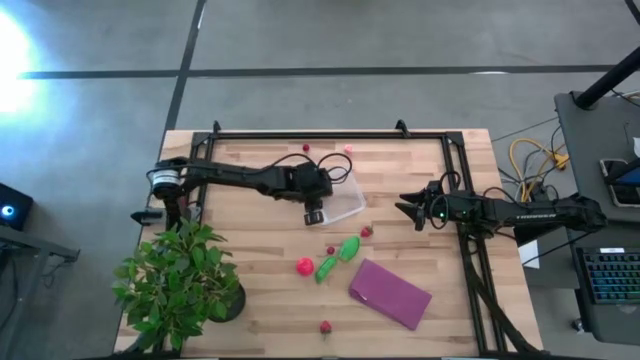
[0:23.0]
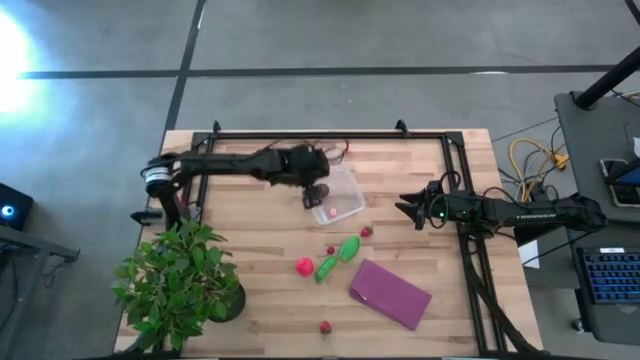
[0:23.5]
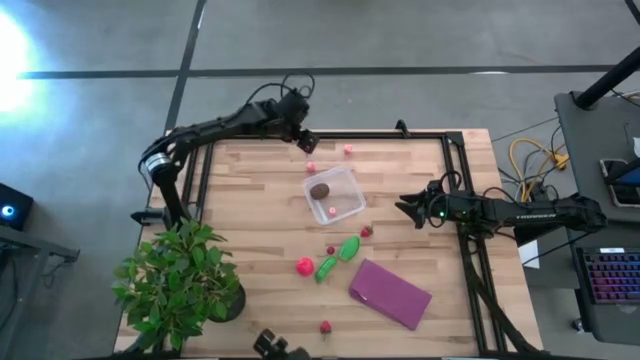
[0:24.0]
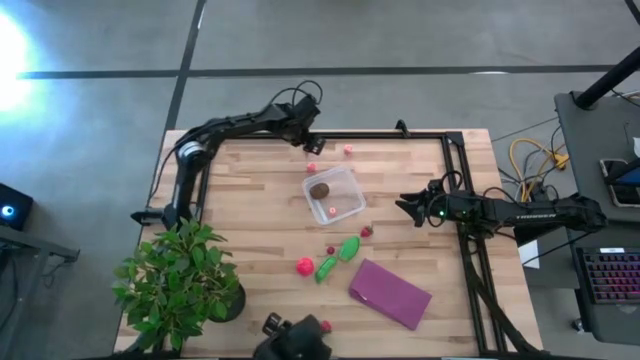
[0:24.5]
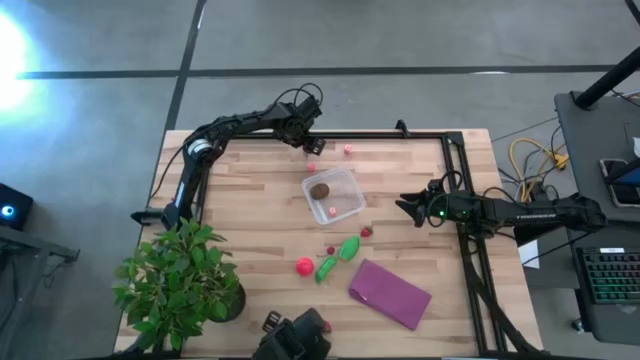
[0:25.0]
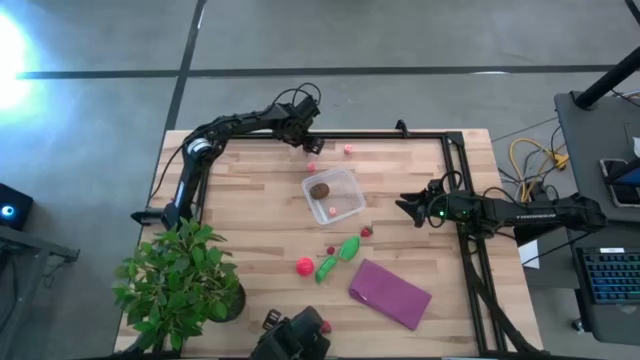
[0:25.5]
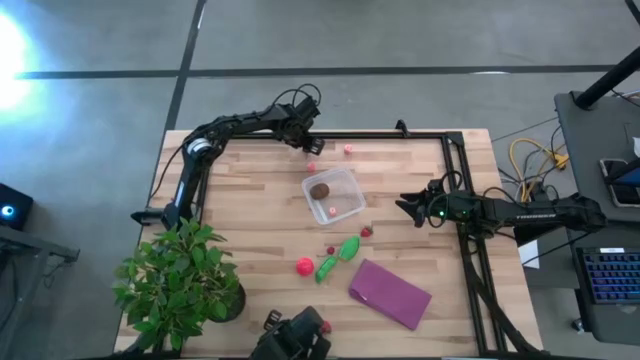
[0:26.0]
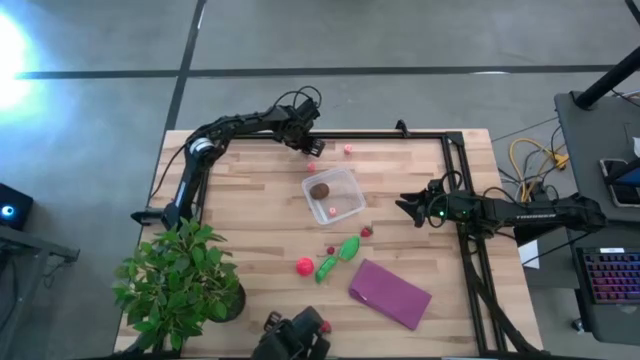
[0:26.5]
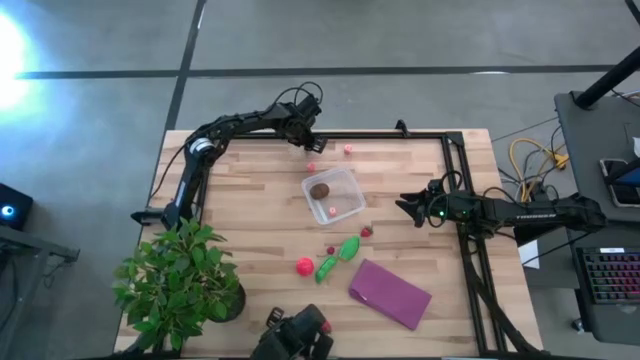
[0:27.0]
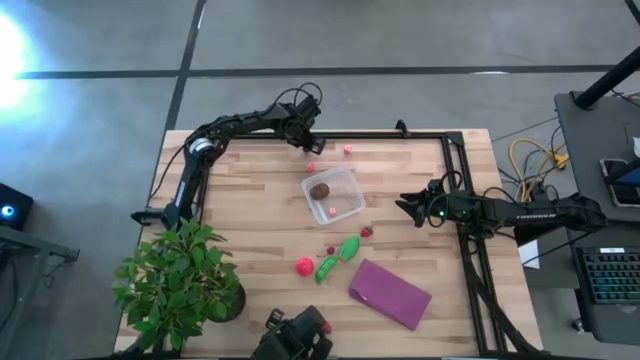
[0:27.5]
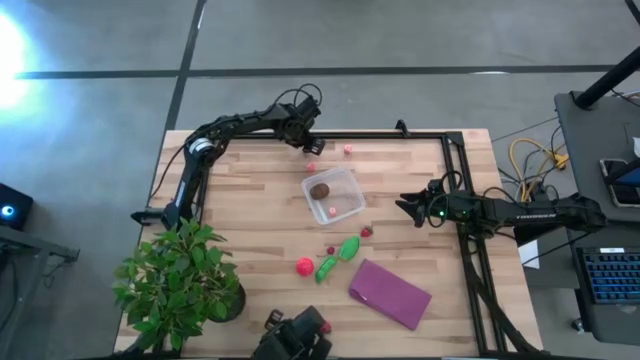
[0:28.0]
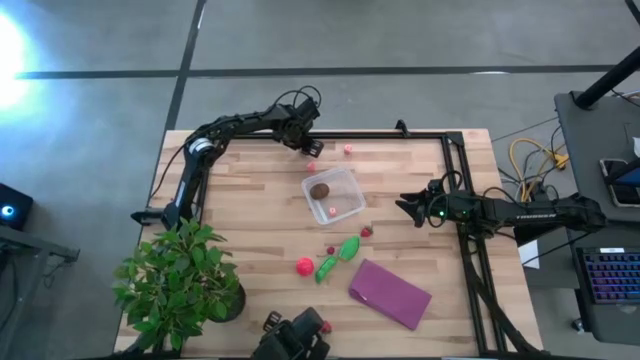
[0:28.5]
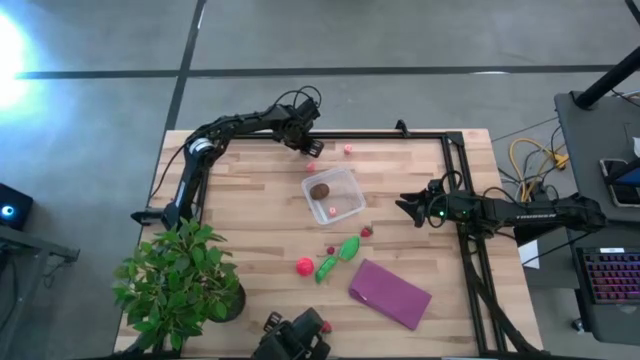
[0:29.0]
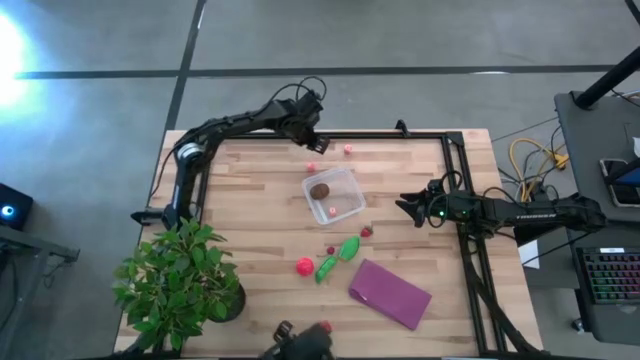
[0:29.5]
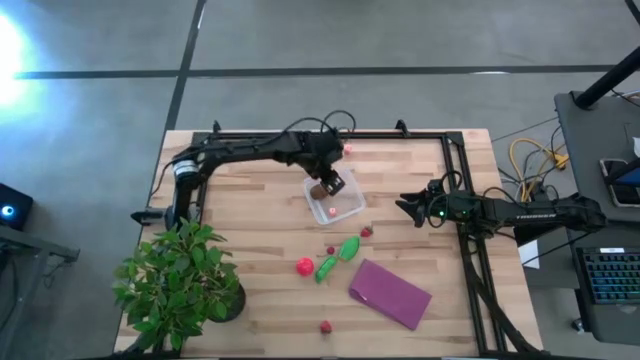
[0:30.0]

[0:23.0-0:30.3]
Task: Pick and placing Produce into tupperware
Put the top red cherry into the transparent bin

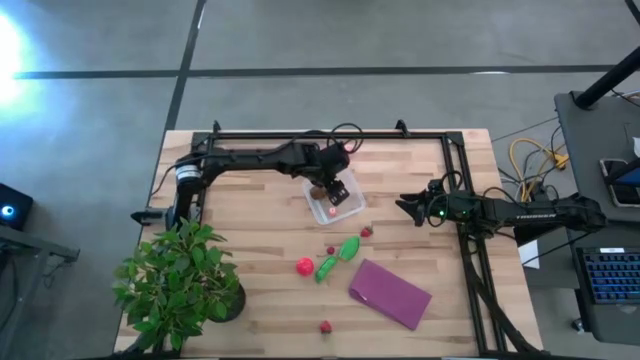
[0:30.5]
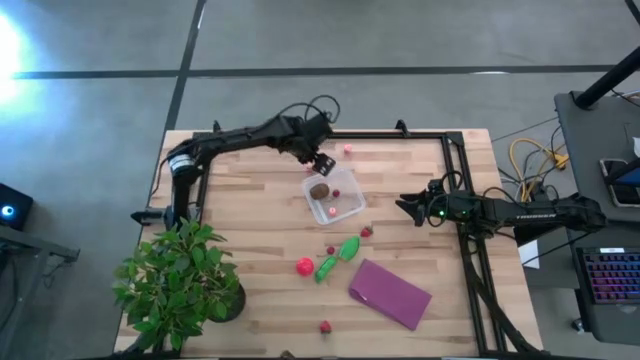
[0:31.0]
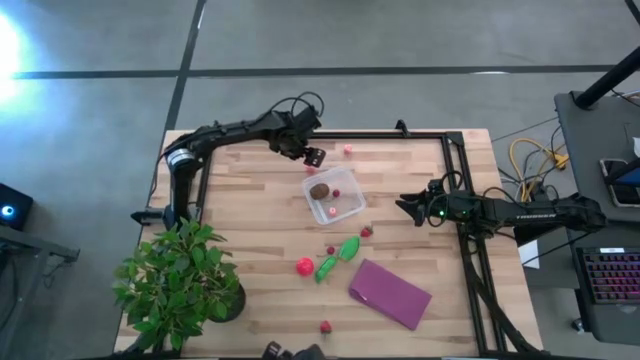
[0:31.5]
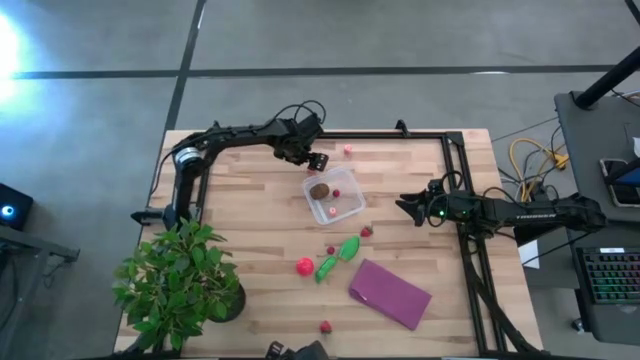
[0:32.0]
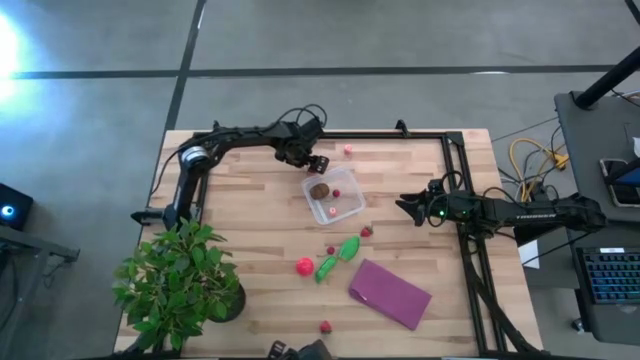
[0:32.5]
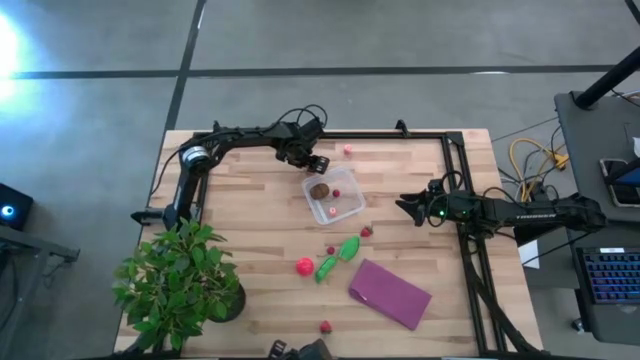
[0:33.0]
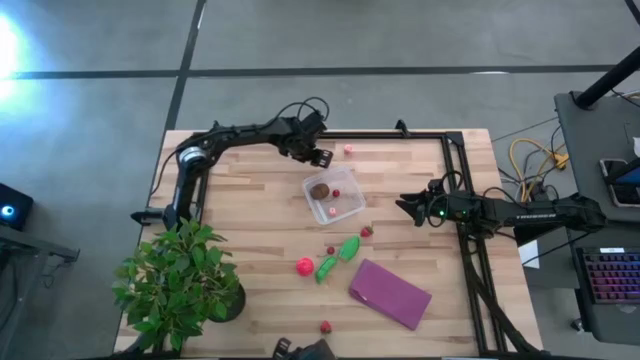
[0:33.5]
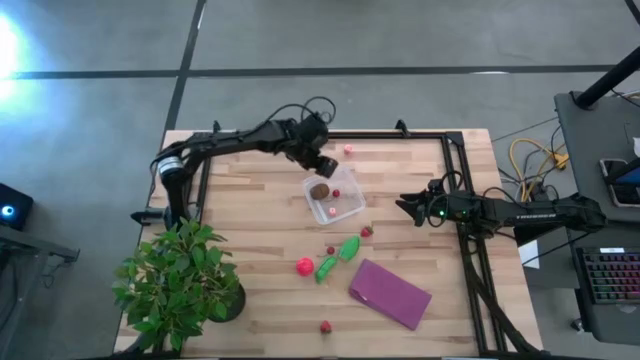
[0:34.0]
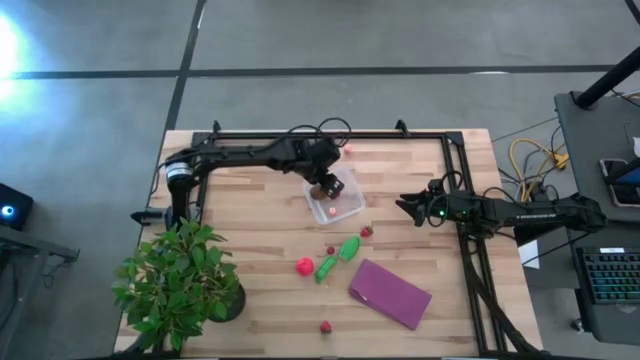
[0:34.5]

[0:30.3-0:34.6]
Put the left pink peach into the transparent bin

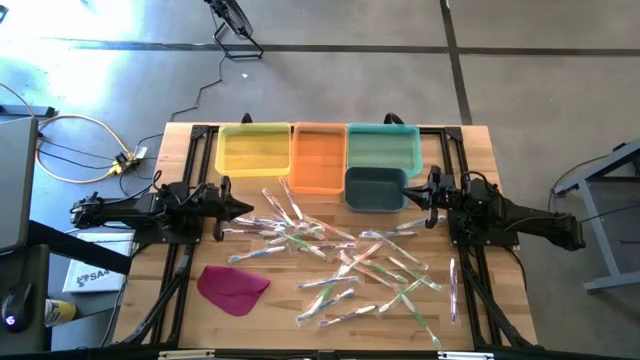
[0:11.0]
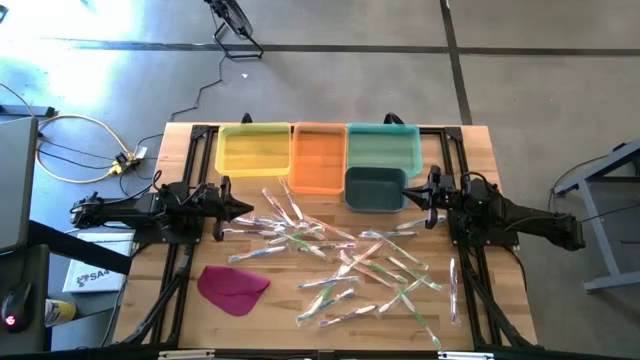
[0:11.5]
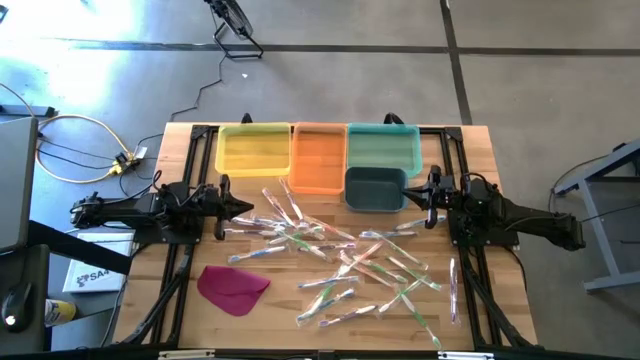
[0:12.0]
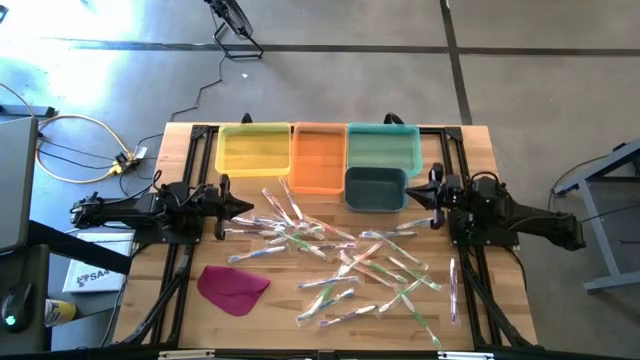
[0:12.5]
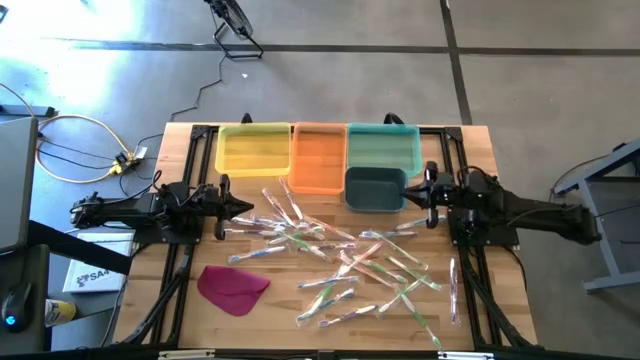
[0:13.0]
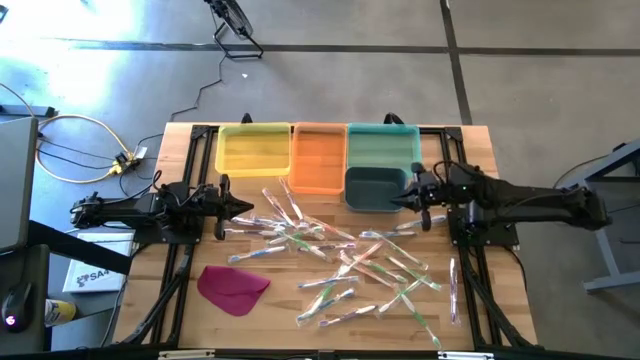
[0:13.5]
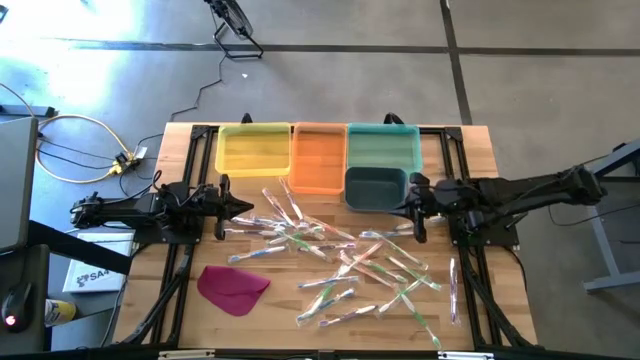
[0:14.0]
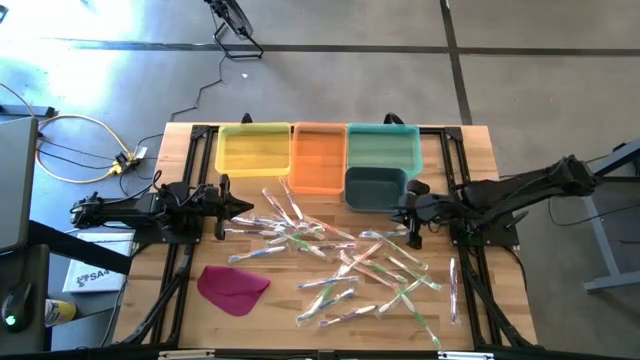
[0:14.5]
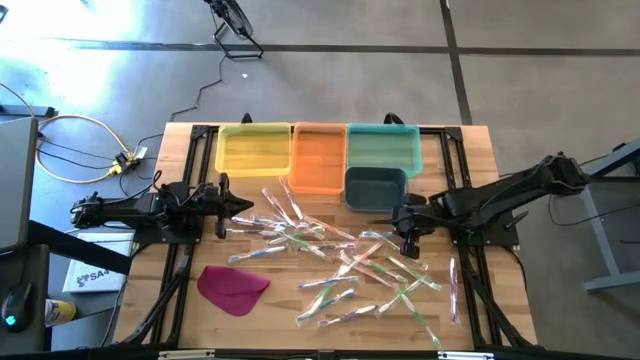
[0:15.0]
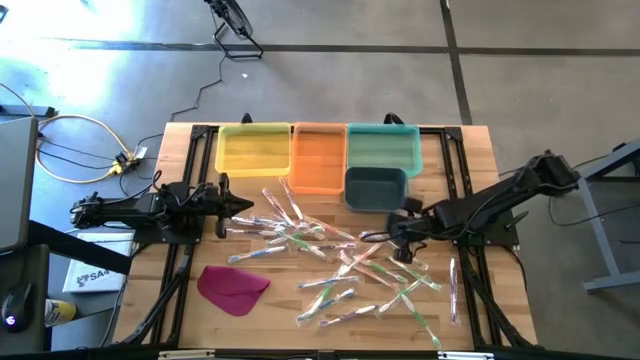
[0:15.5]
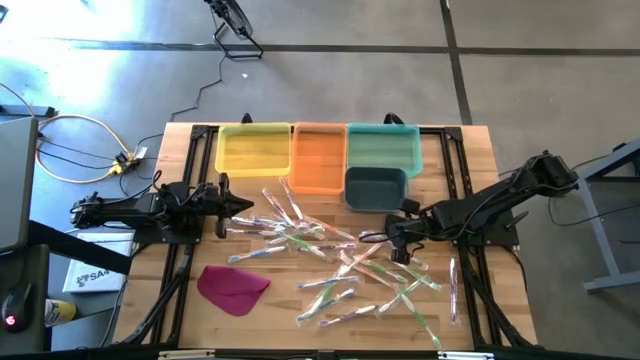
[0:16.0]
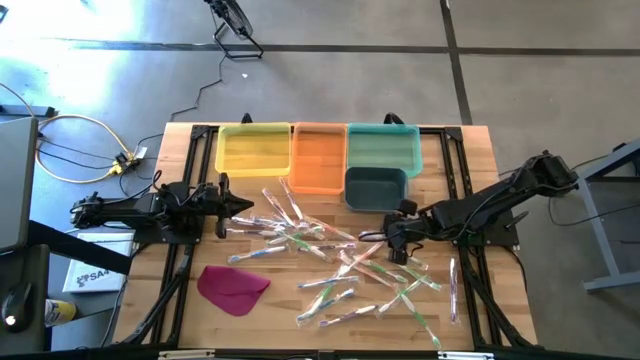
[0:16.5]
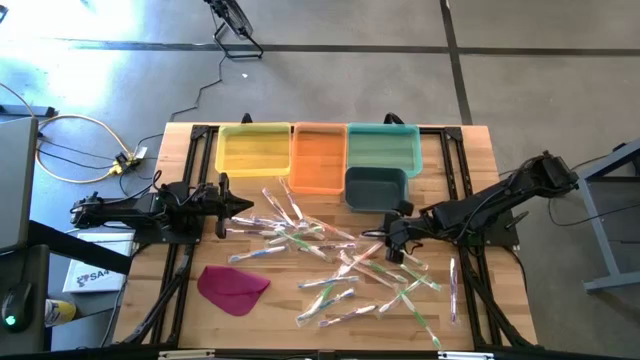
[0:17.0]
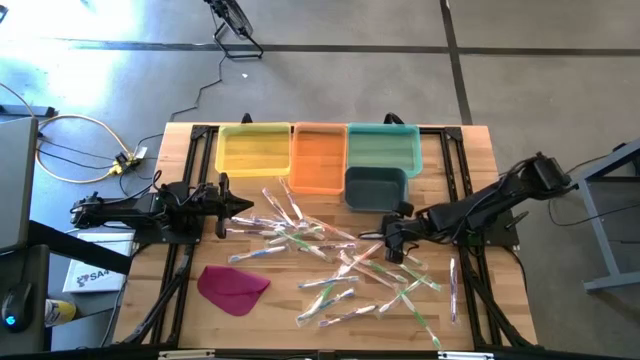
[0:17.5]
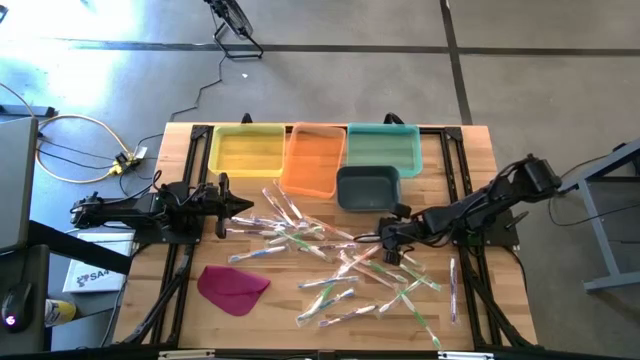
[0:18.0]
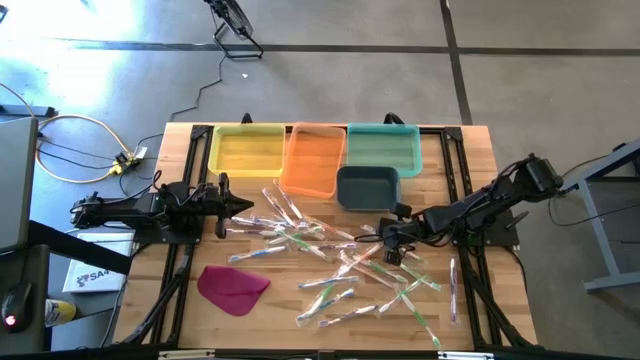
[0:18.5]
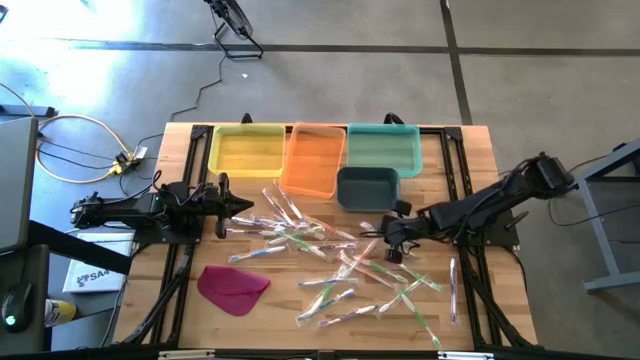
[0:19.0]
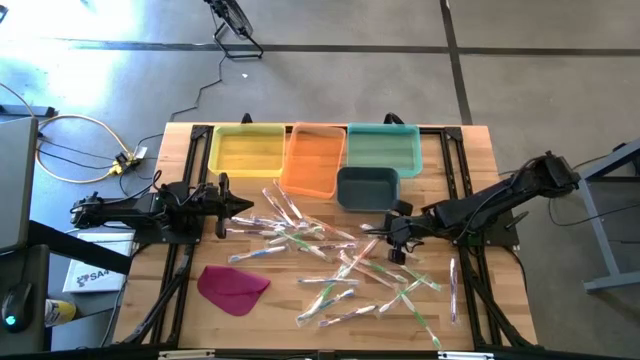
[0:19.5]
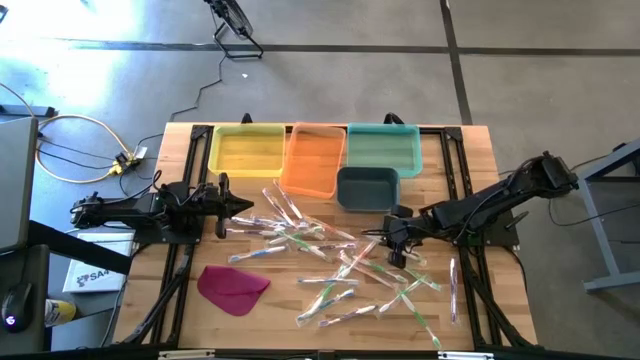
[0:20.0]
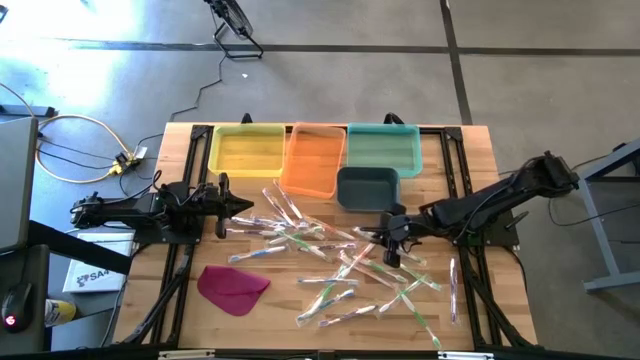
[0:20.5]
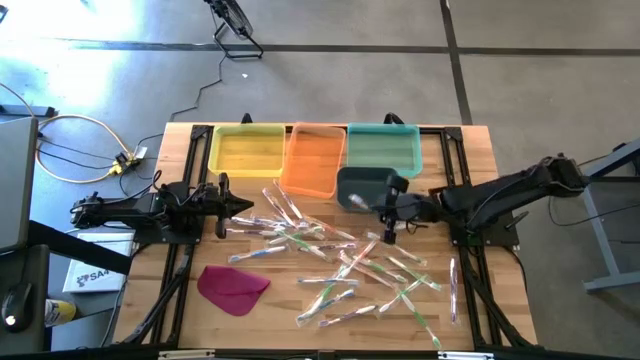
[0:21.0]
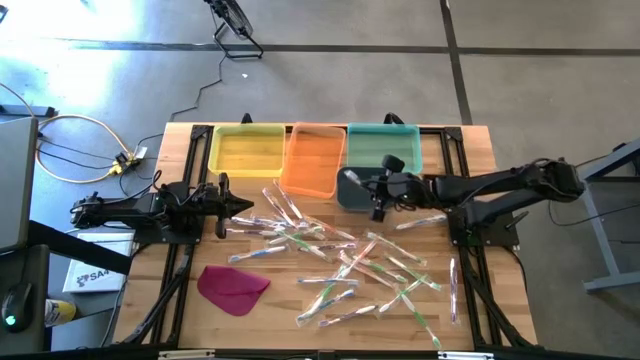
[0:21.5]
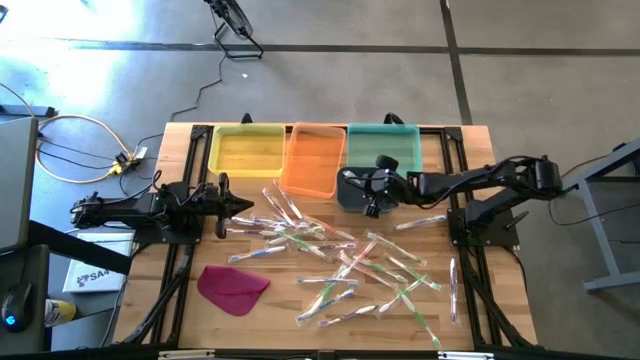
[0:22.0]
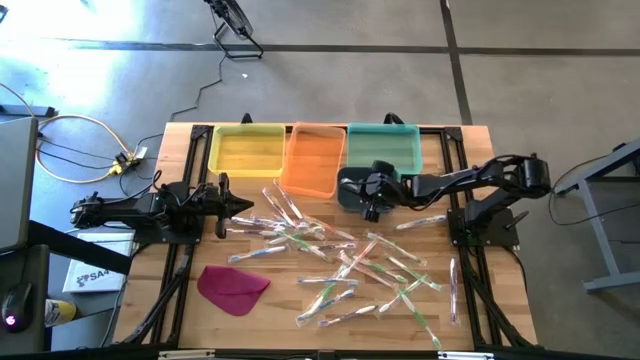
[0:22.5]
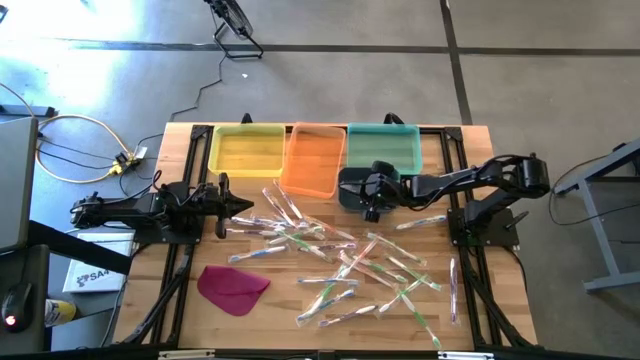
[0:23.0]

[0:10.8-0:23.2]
Task: Pick & Place Toothbrushes
Put the blue toothbrush into the dark blue bin
